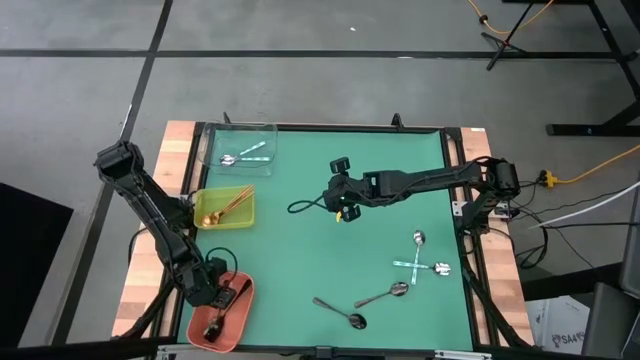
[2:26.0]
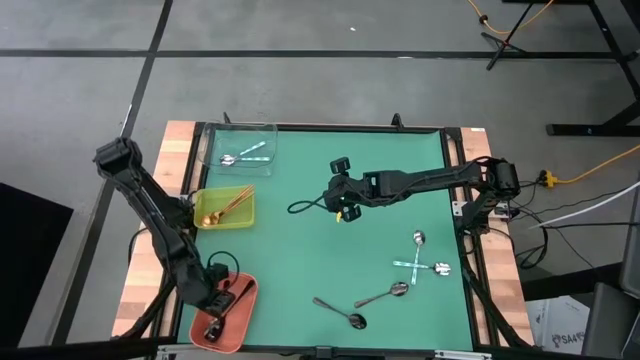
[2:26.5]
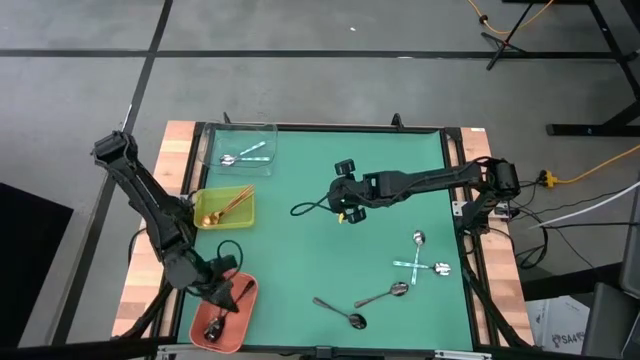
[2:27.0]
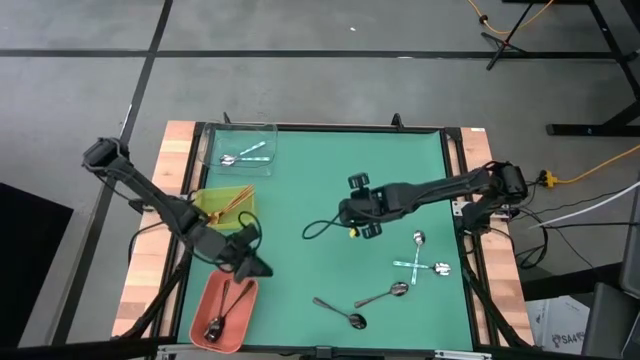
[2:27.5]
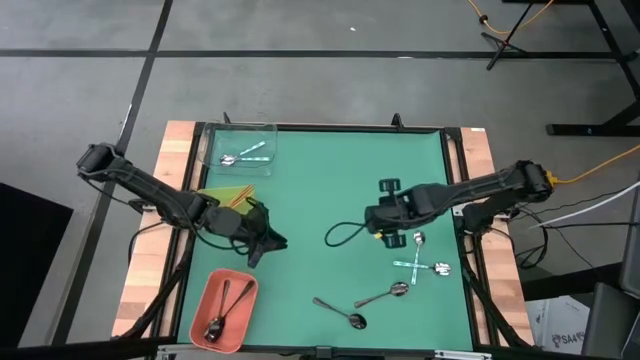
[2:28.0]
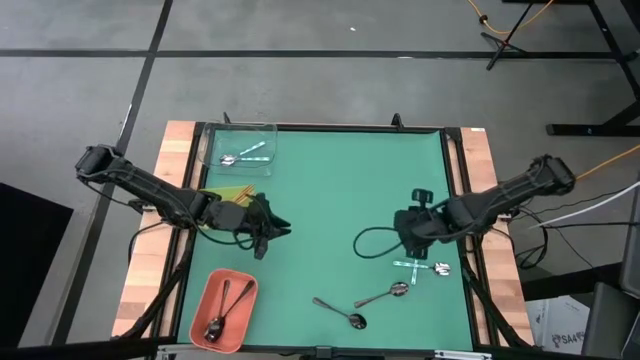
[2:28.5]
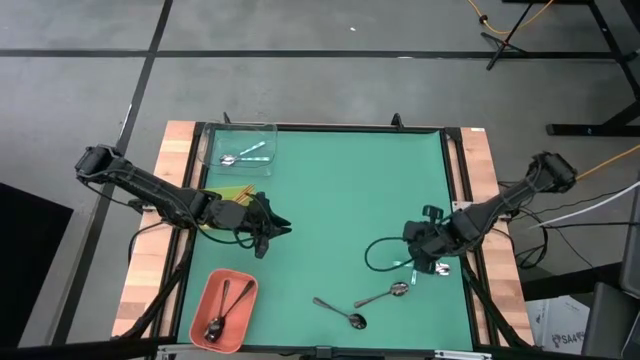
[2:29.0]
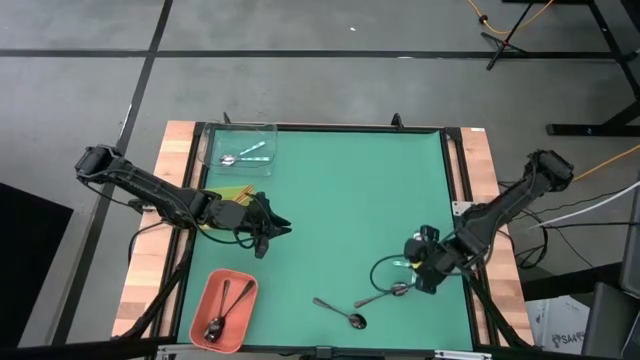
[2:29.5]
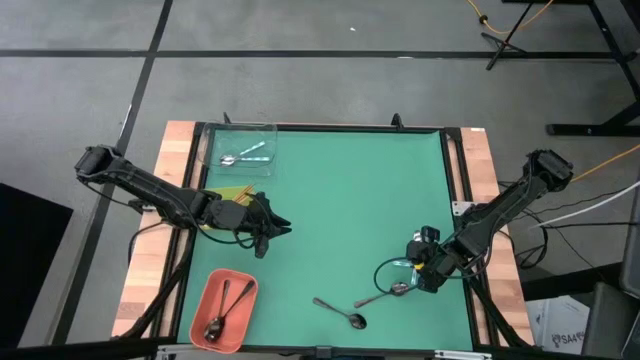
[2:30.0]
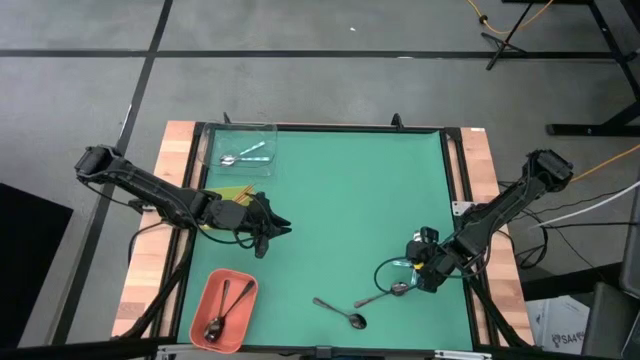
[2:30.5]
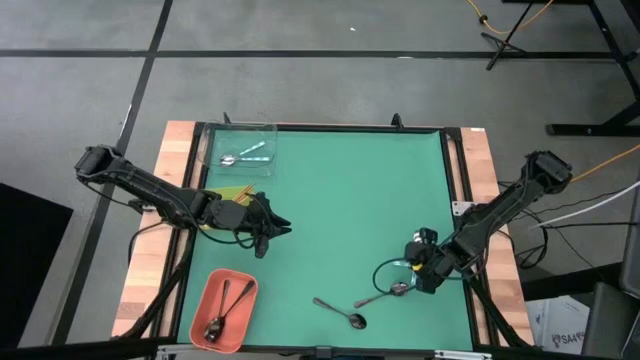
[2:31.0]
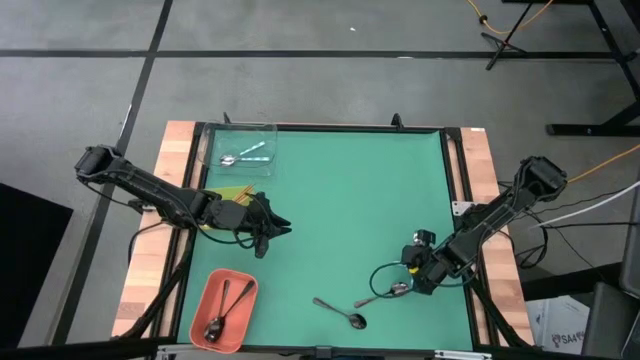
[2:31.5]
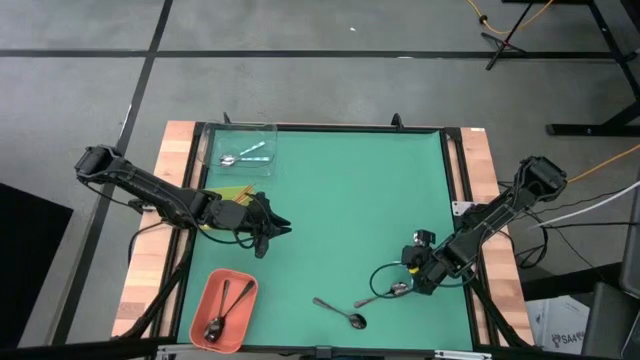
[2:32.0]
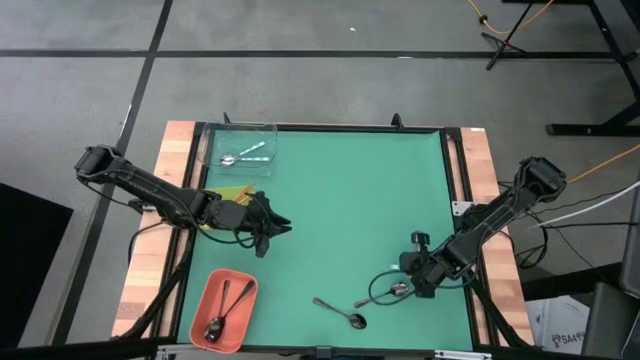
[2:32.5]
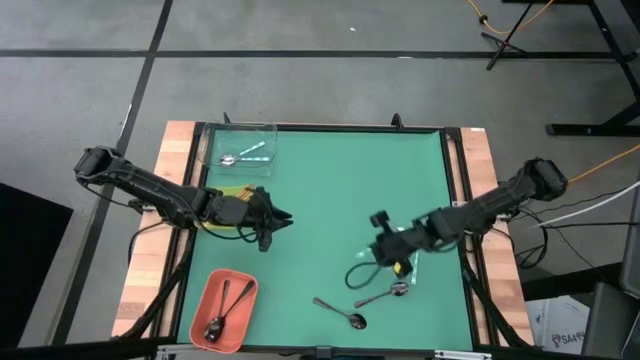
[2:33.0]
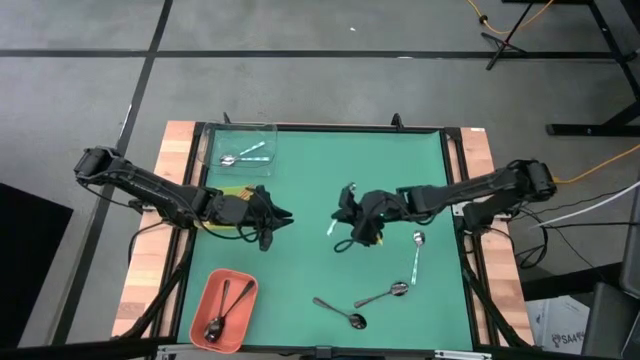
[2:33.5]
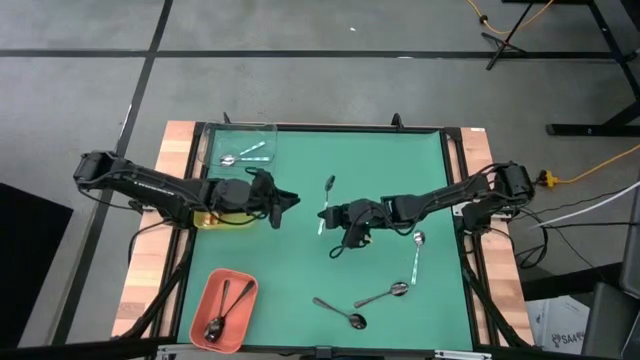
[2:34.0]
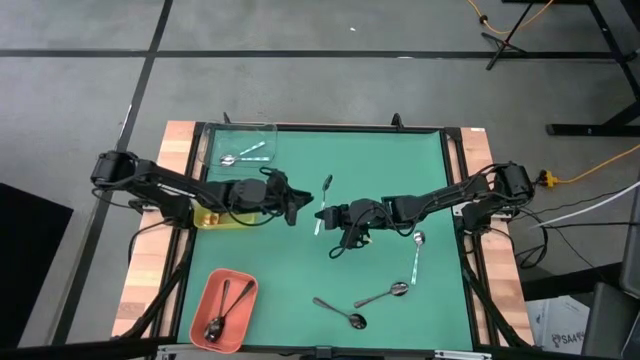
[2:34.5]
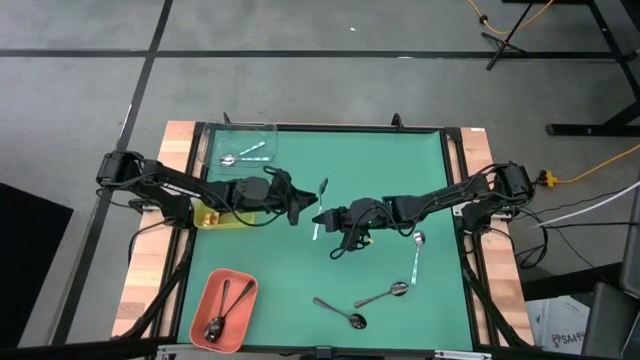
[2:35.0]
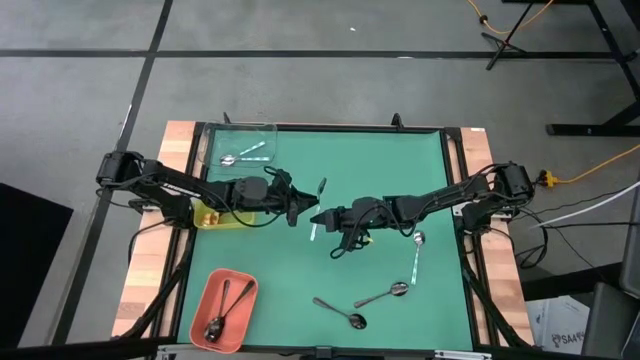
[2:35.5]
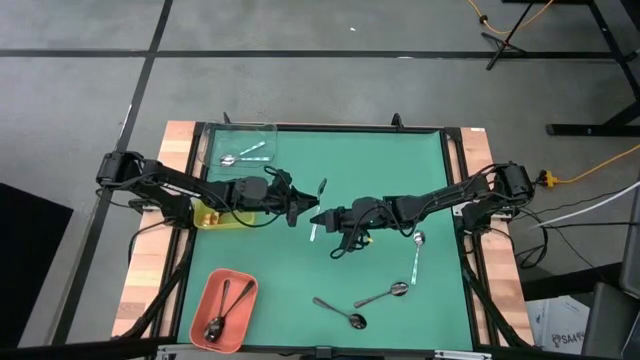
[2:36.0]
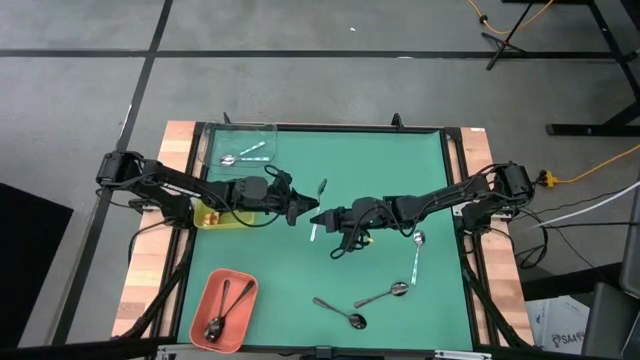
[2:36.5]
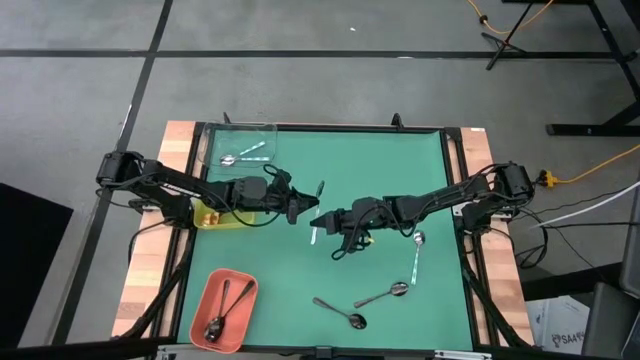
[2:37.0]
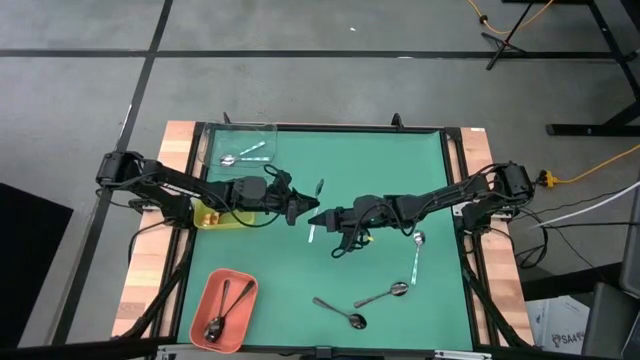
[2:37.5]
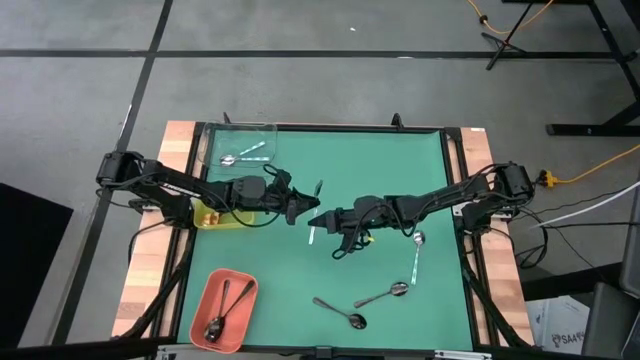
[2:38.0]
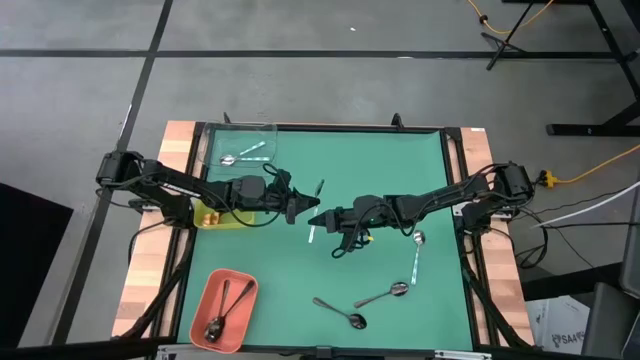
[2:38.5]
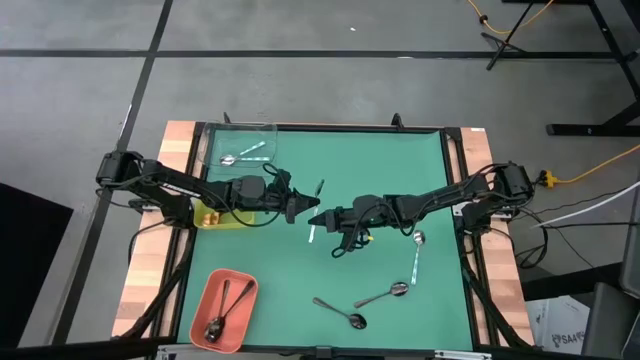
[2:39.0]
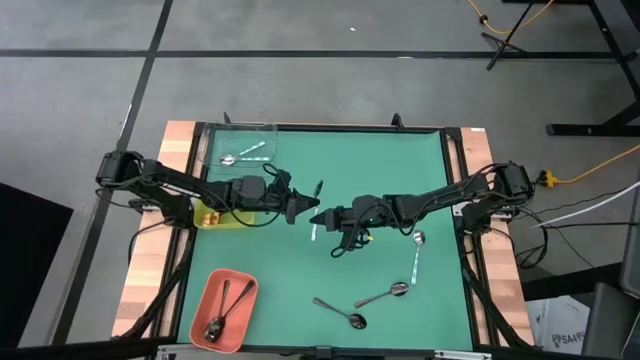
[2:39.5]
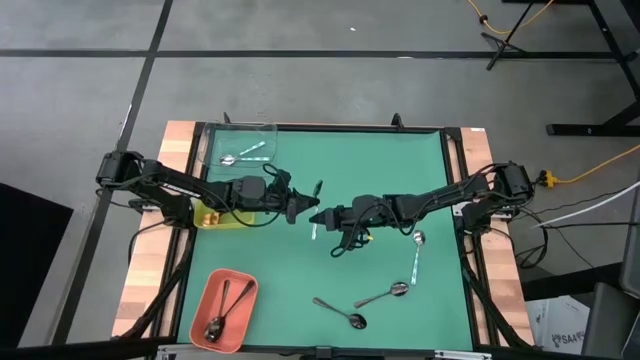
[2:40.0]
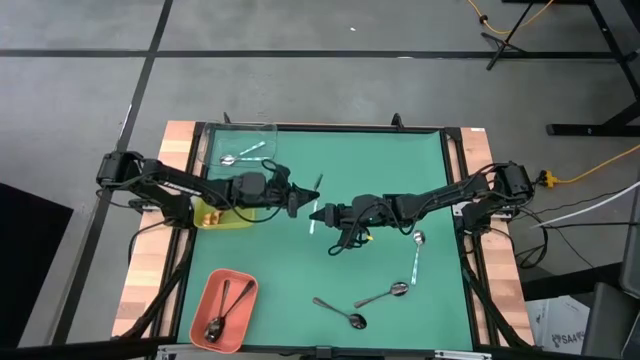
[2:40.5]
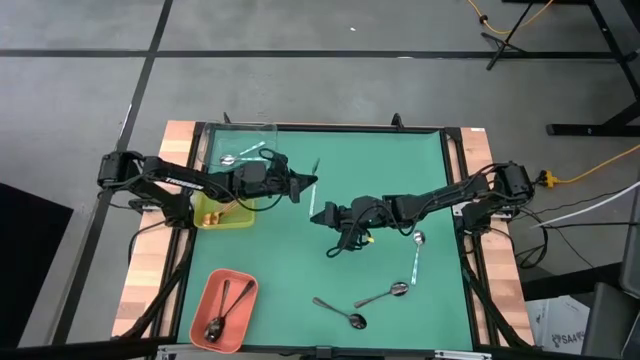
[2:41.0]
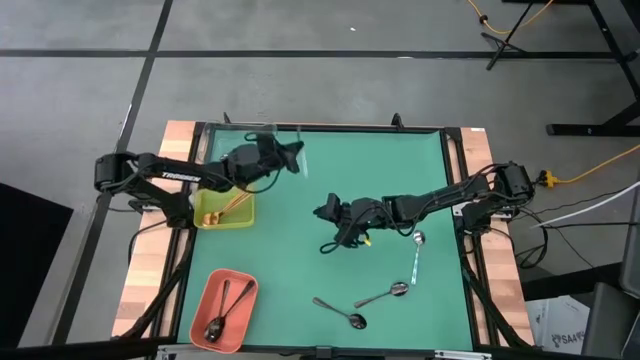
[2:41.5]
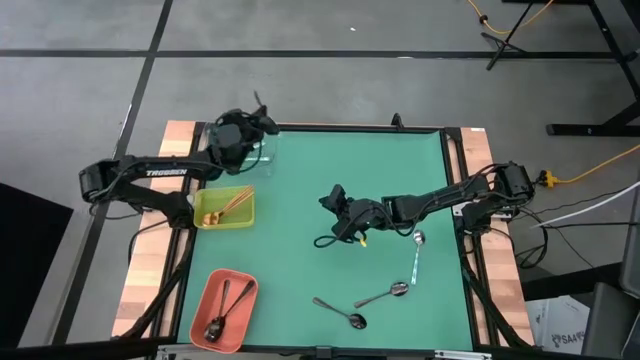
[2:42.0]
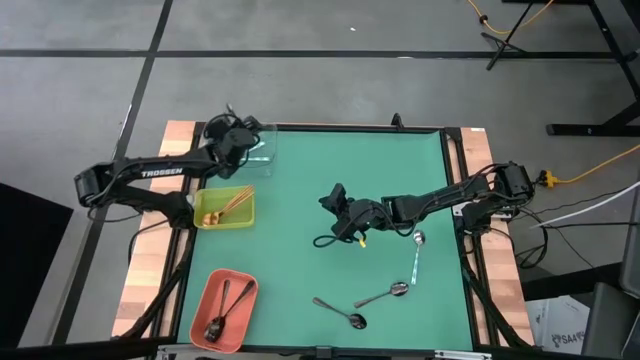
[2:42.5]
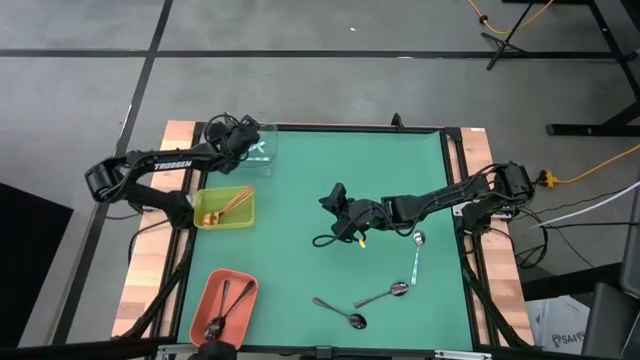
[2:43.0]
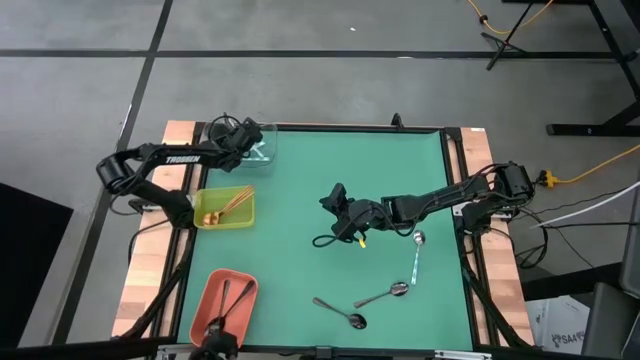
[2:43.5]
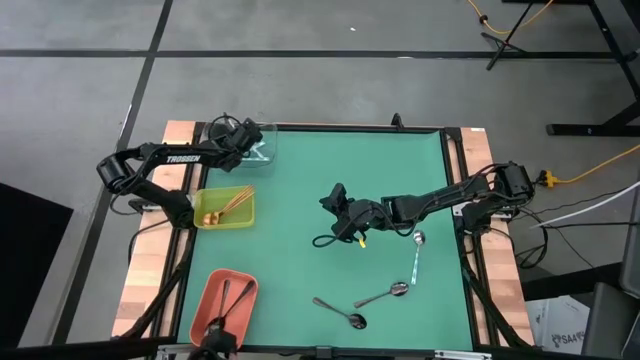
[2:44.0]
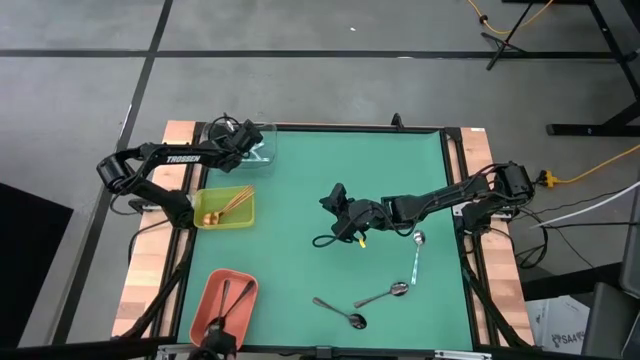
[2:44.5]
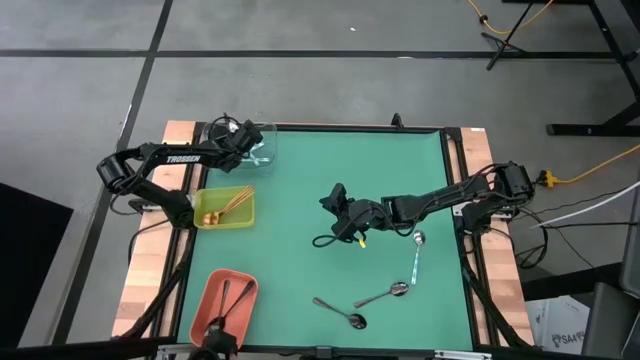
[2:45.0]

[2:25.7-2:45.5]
Task: Sort silverware by color (type)
Put the white spoon into the transparent bin
